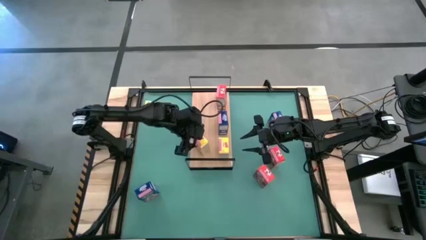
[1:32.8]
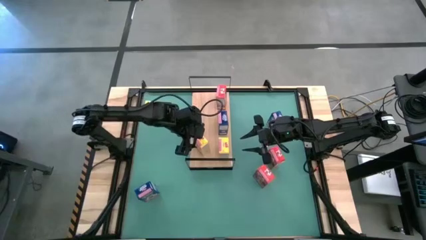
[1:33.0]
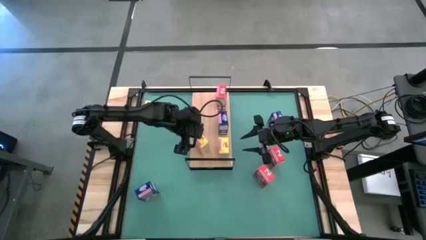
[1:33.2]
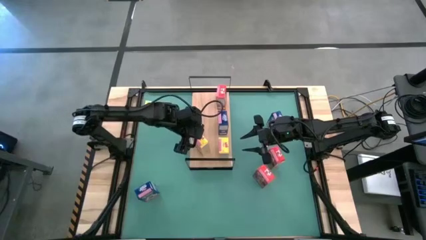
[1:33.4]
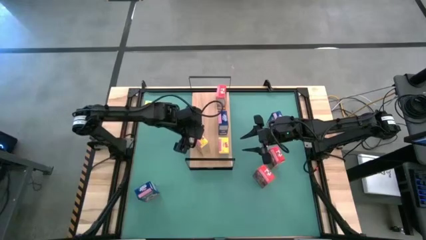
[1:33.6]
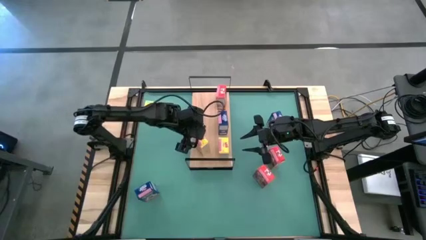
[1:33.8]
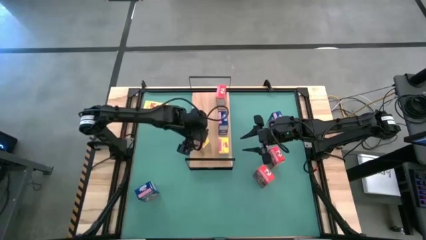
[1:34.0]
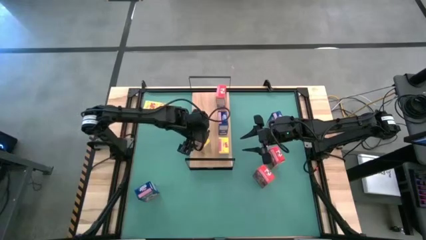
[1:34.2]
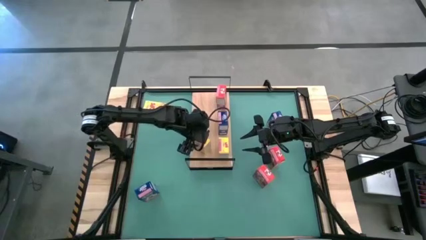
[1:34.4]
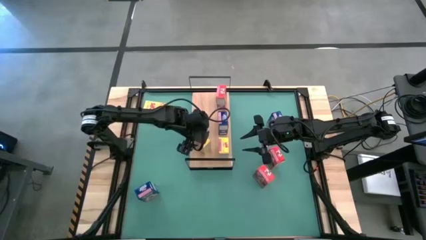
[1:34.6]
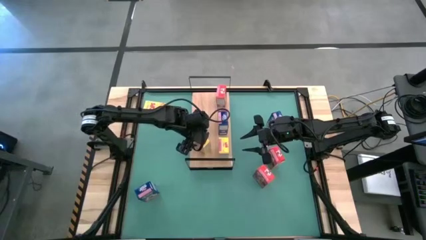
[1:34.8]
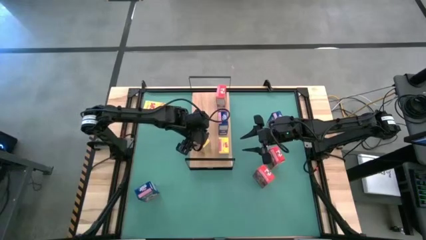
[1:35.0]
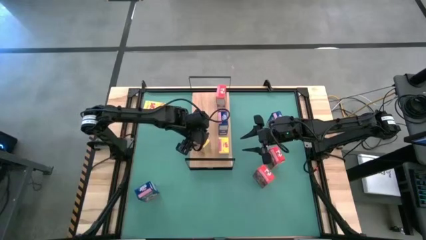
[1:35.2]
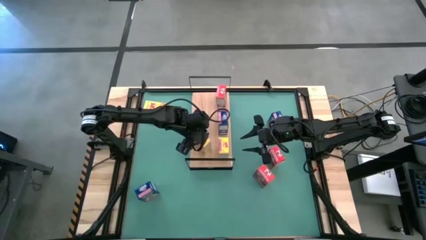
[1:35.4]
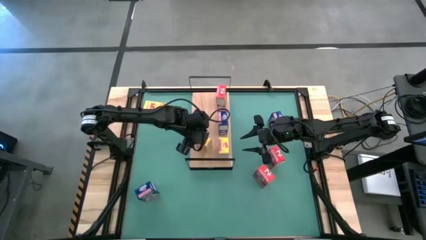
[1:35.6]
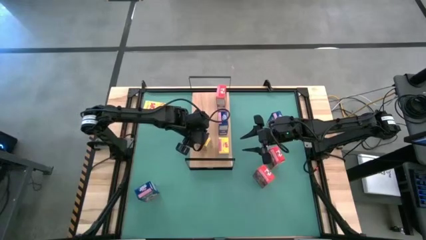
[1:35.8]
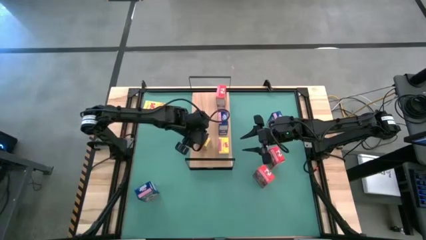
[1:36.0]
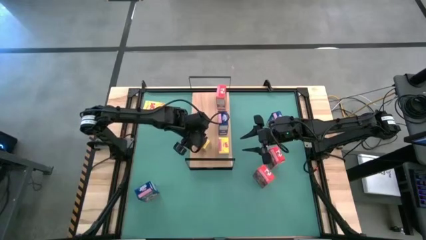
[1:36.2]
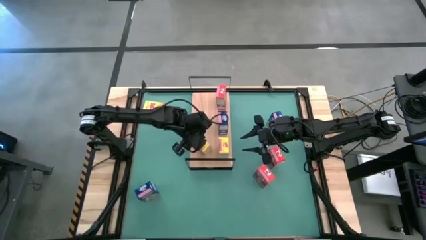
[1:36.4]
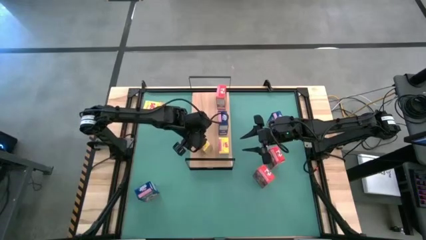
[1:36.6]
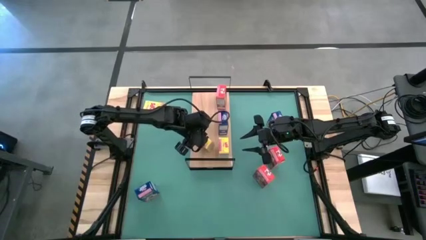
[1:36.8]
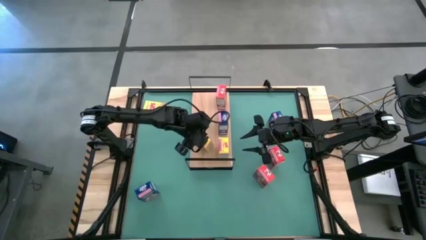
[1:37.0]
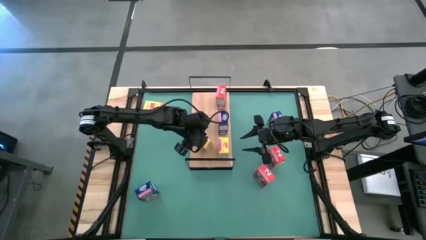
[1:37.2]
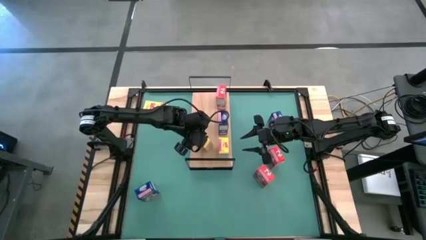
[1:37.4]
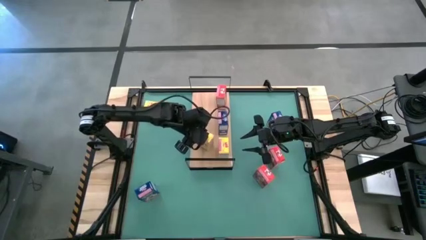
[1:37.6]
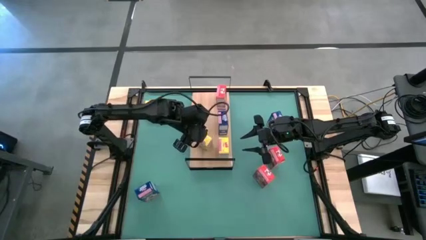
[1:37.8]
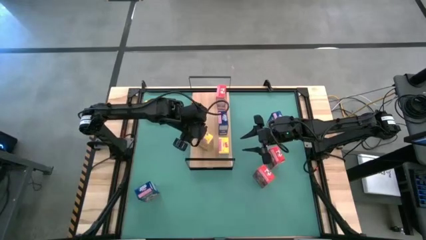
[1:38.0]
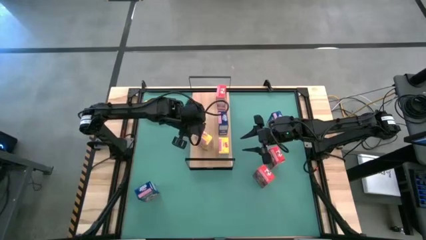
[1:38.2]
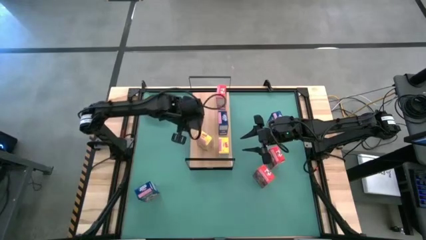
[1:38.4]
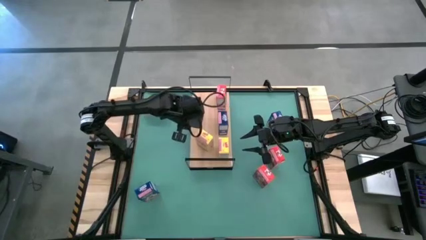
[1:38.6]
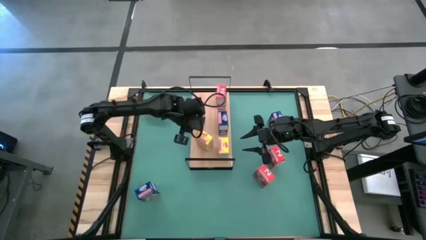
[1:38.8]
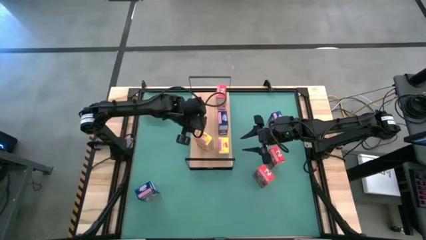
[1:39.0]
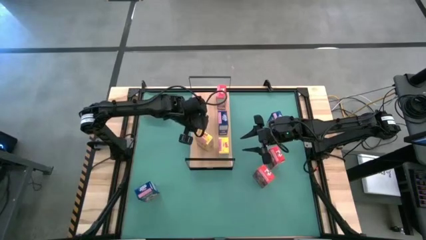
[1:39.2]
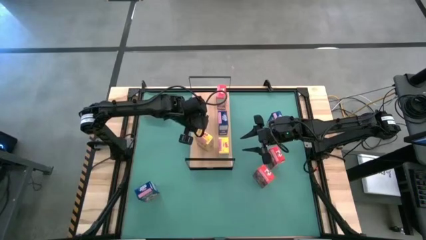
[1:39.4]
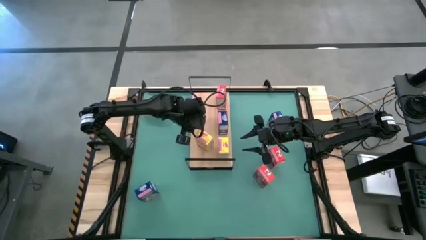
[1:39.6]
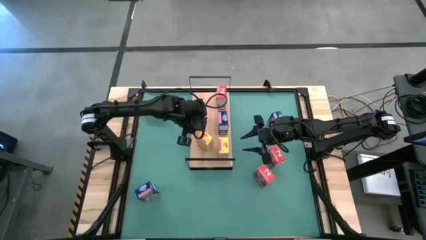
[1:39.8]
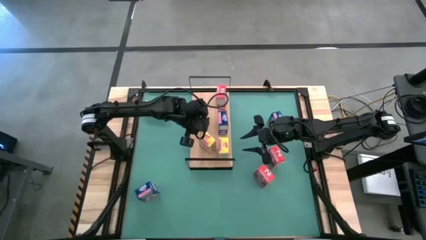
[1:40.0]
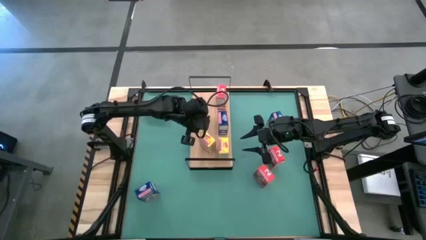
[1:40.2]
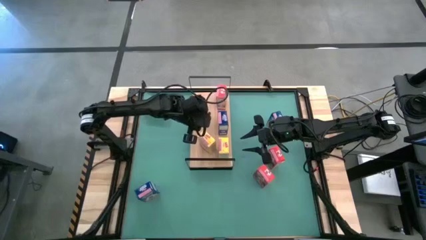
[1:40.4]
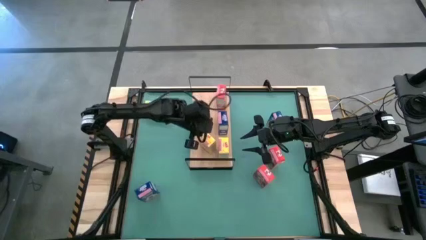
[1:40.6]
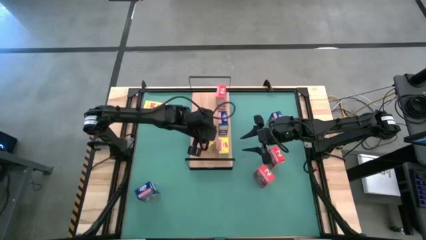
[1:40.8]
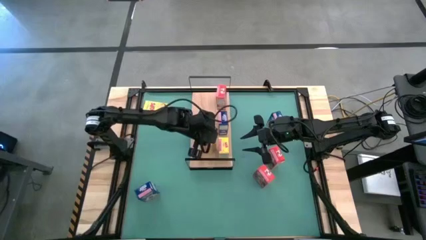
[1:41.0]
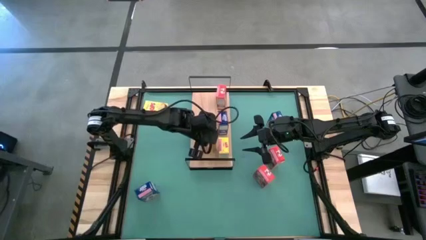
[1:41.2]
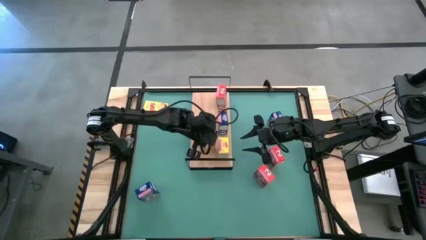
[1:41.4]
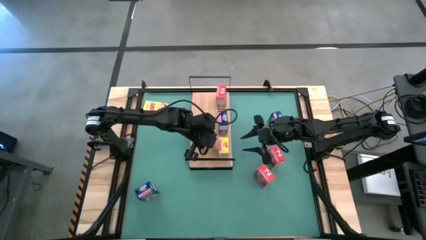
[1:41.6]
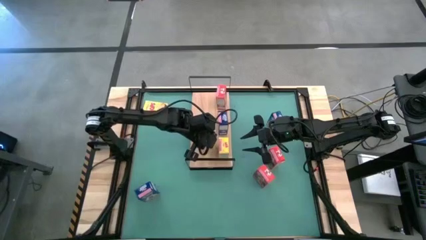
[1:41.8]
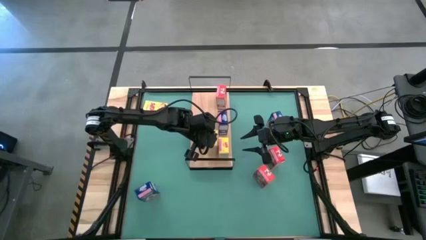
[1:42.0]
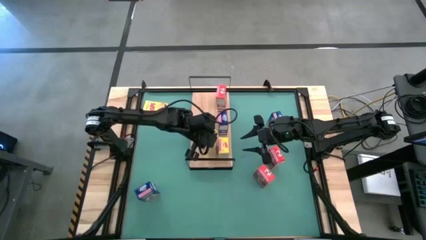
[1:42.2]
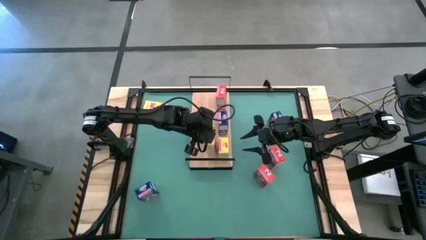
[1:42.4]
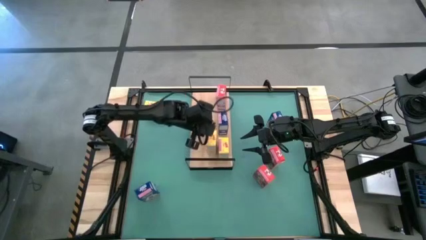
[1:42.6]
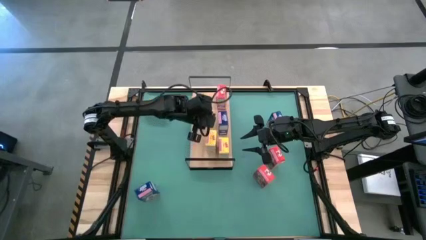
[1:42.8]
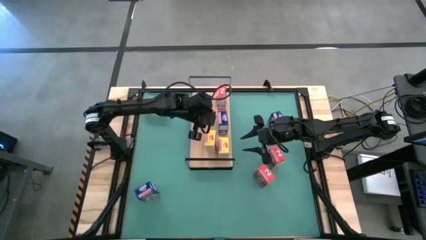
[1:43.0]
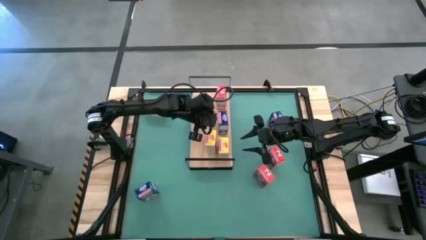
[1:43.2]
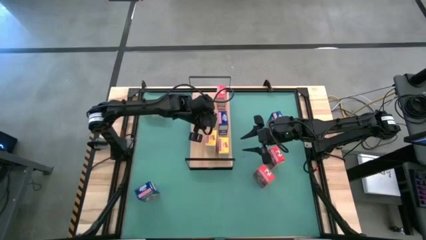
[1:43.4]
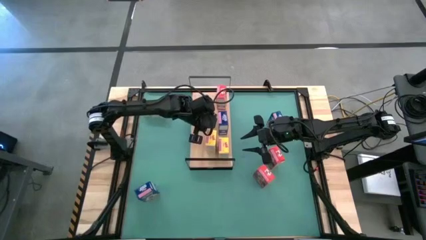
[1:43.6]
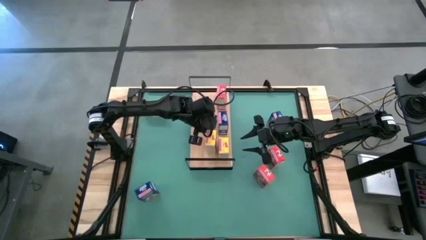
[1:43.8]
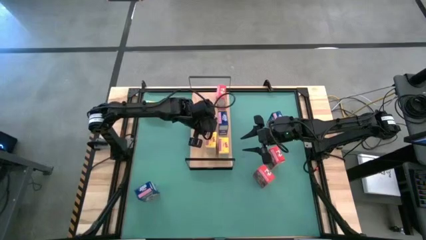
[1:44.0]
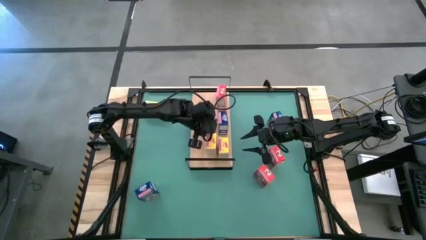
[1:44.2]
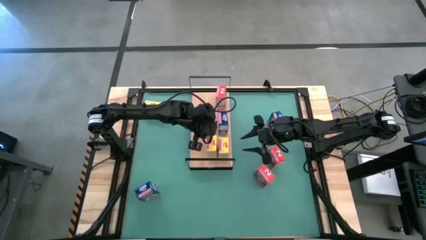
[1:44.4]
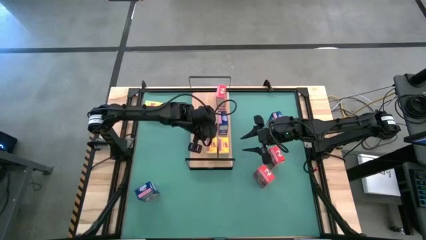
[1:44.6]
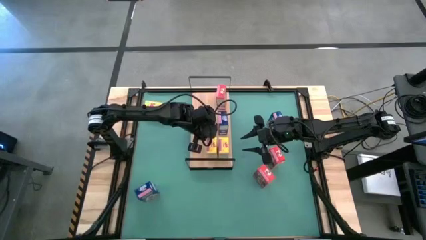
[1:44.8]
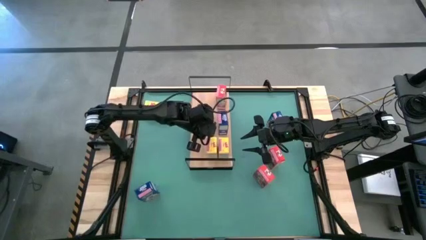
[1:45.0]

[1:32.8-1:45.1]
Task: Stack cereal on shelf
Put the right yellow cereal box on the shelf aligned with the other yellow cereal box

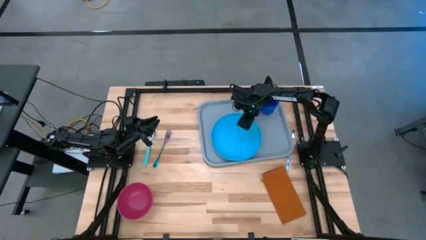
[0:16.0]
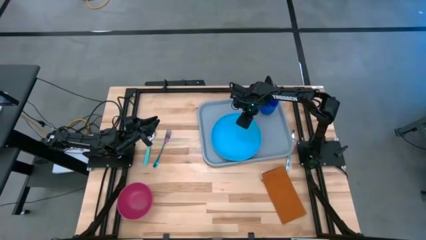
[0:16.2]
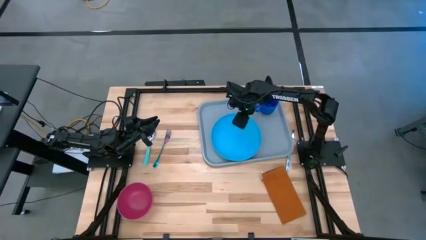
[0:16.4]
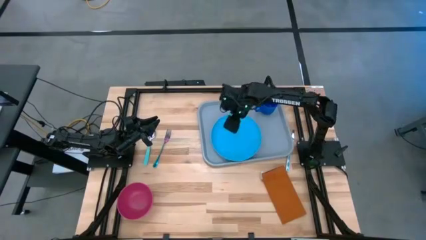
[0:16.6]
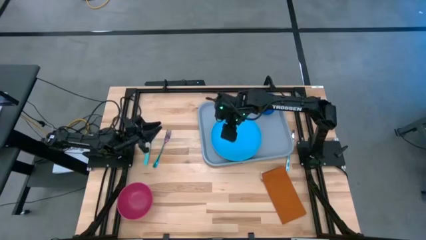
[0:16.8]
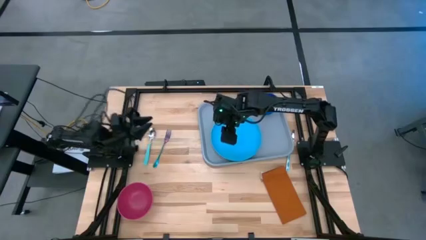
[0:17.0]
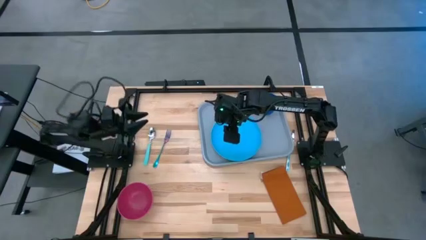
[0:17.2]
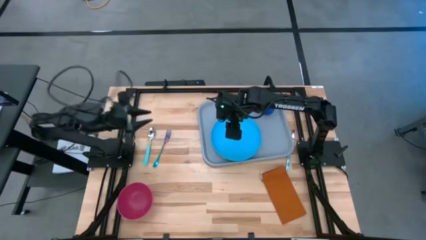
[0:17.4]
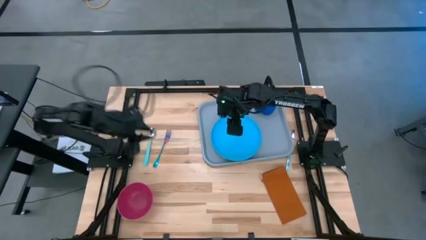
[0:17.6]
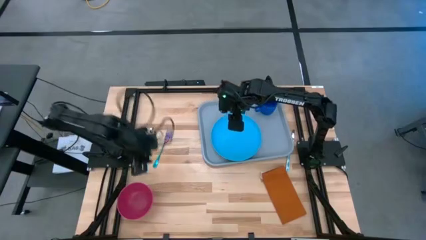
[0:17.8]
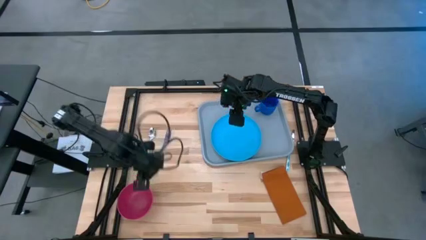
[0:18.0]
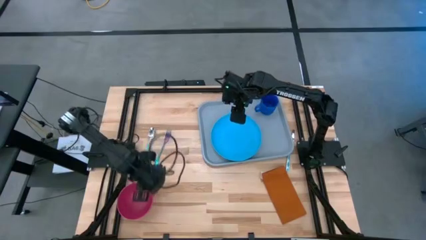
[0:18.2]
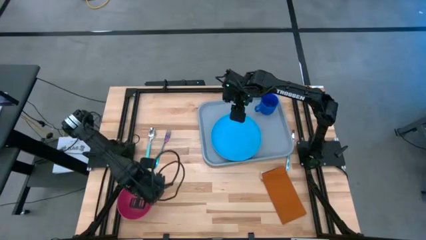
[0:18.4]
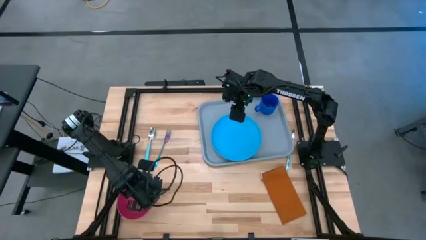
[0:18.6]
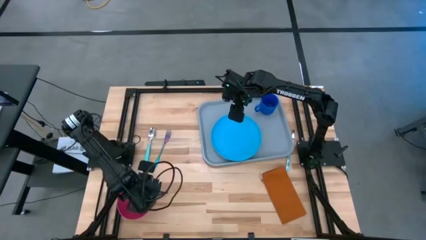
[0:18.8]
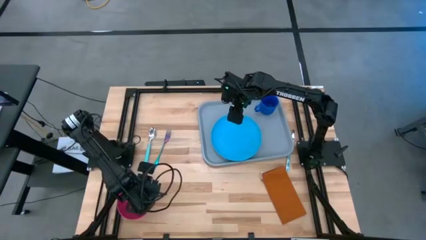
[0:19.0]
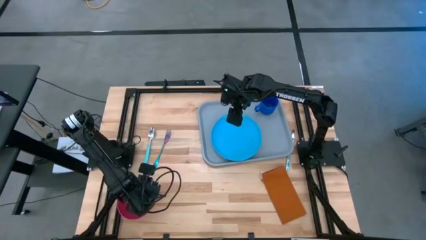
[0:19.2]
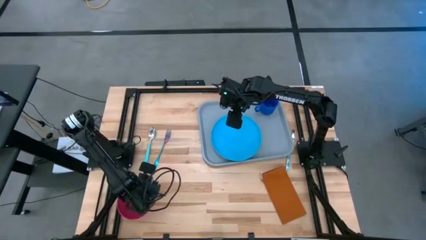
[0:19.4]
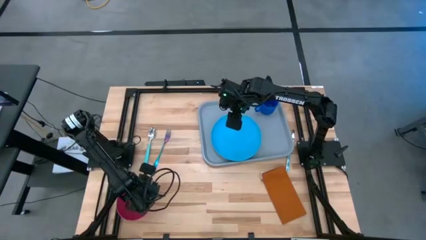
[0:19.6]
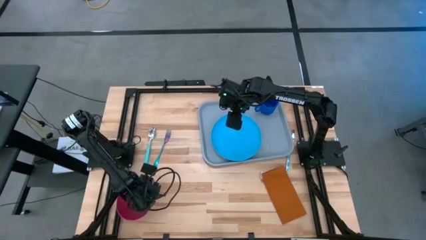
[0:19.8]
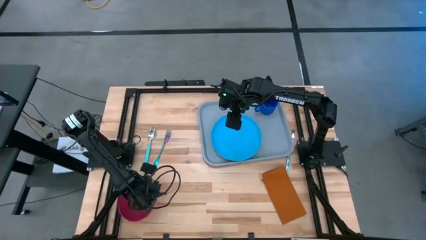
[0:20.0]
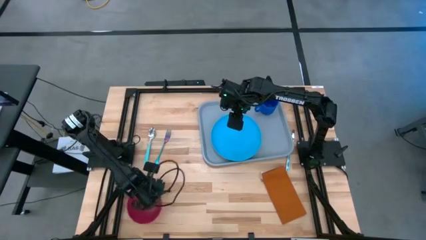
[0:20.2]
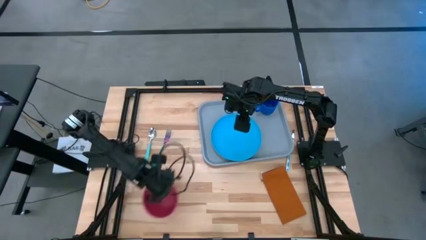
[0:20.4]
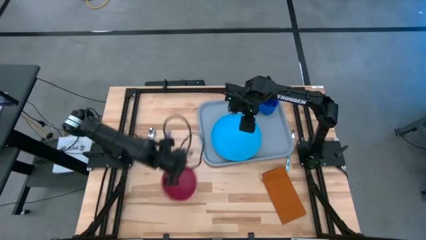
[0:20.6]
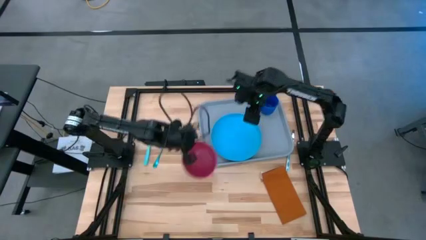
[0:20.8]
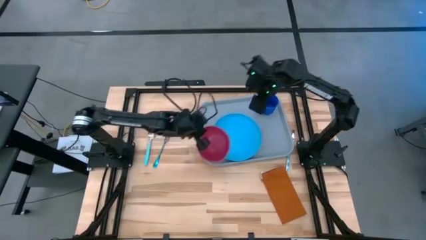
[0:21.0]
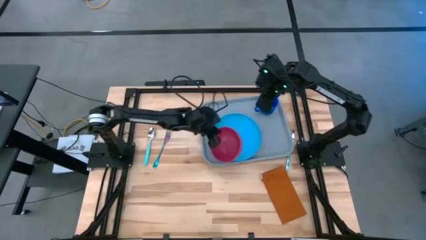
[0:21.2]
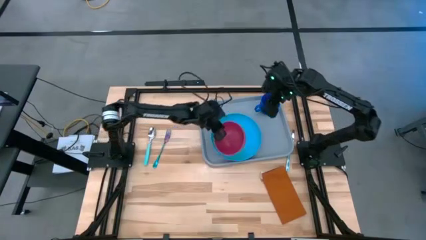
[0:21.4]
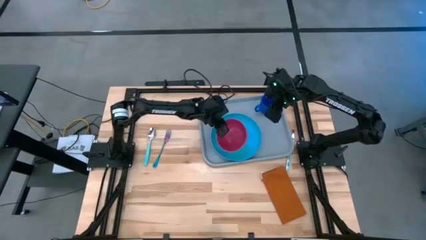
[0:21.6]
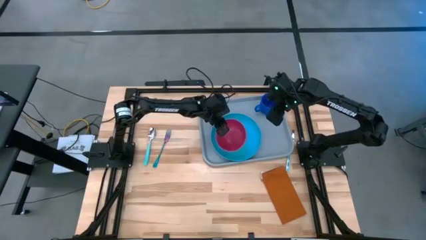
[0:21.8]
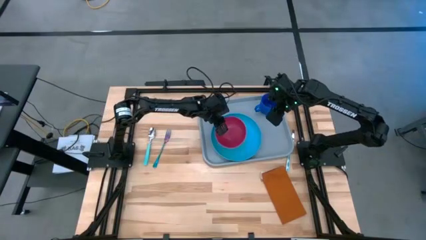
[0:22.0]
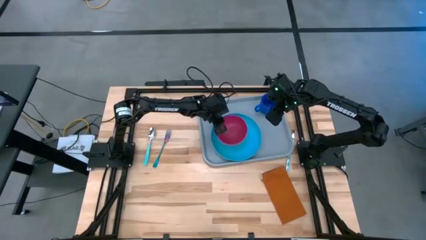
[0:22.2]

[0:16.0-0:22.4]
Task: Set up tray
Put the red bowl on the light blue plate
